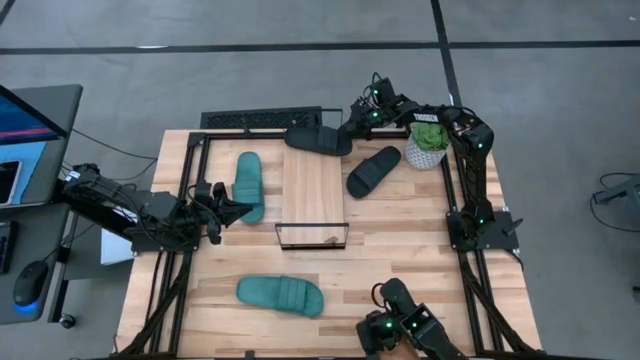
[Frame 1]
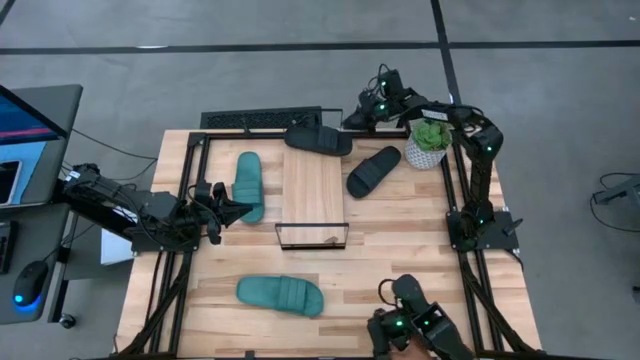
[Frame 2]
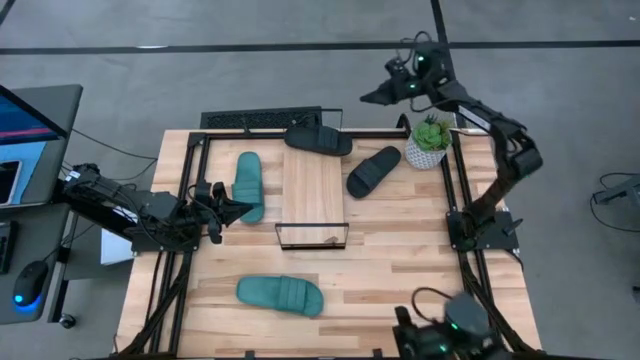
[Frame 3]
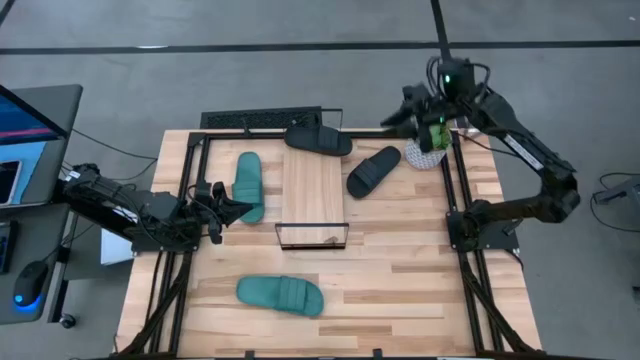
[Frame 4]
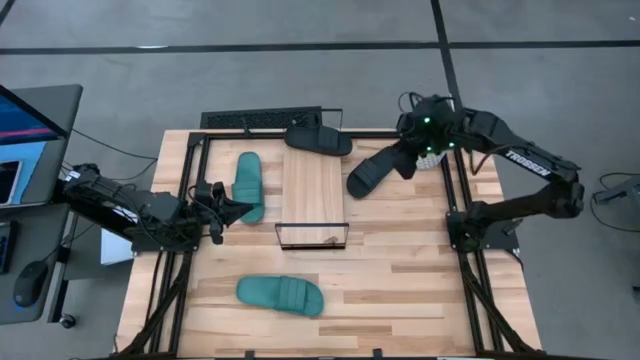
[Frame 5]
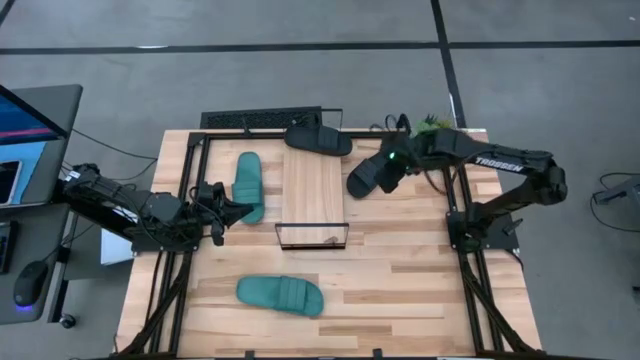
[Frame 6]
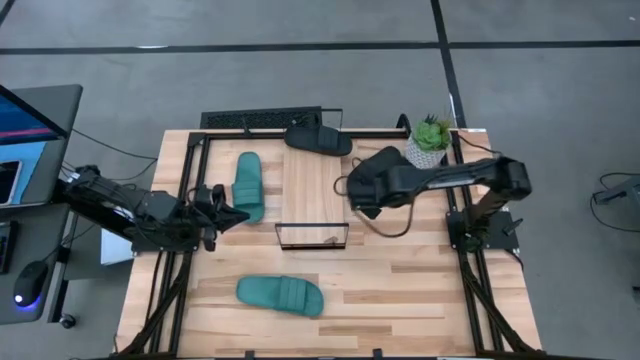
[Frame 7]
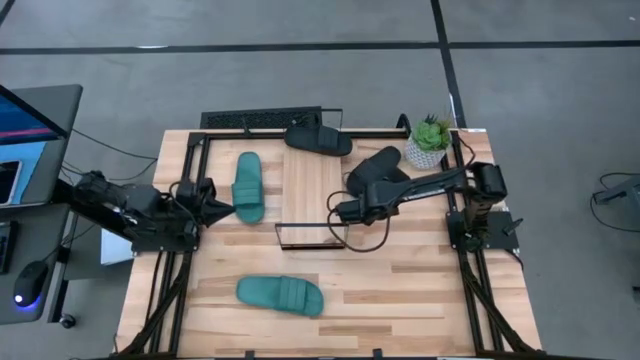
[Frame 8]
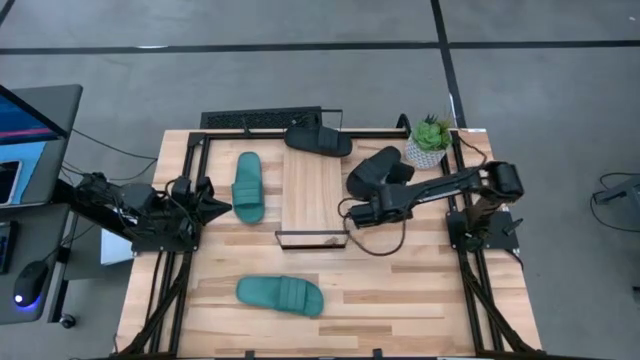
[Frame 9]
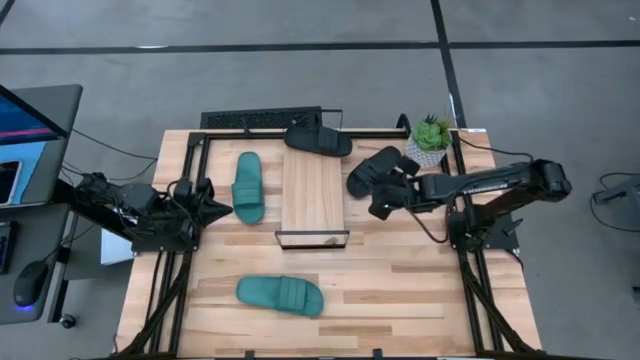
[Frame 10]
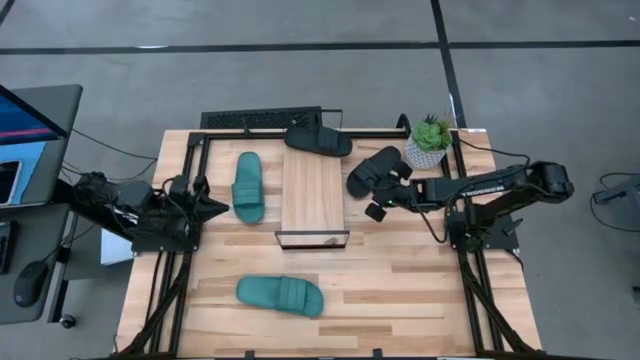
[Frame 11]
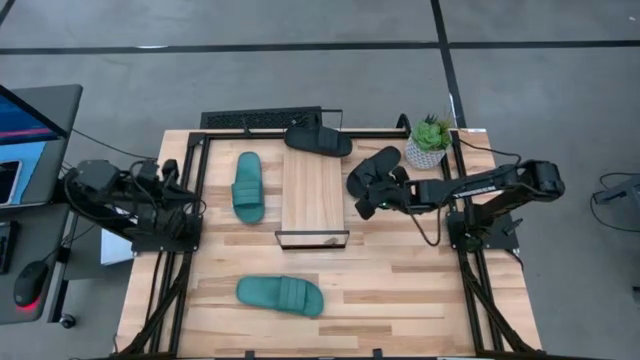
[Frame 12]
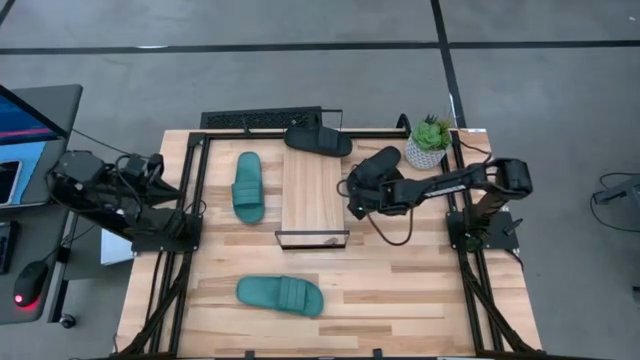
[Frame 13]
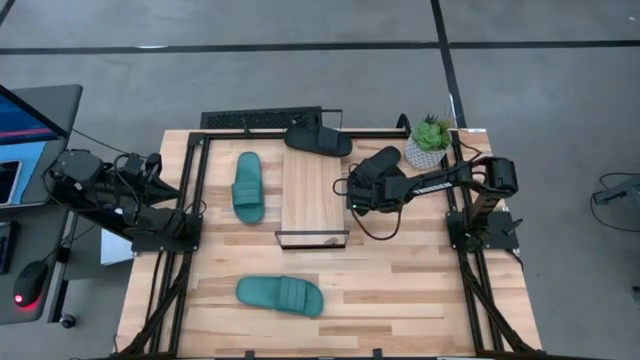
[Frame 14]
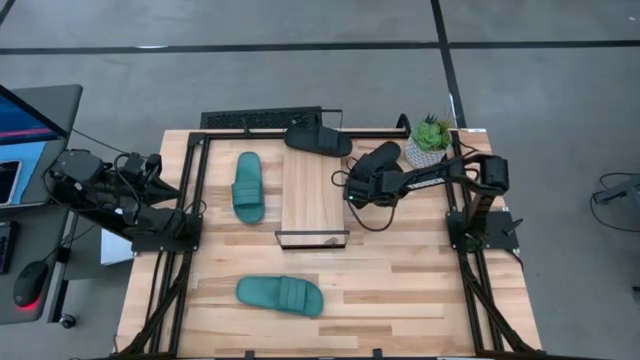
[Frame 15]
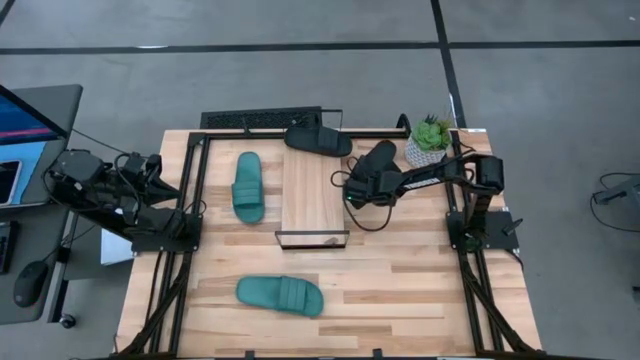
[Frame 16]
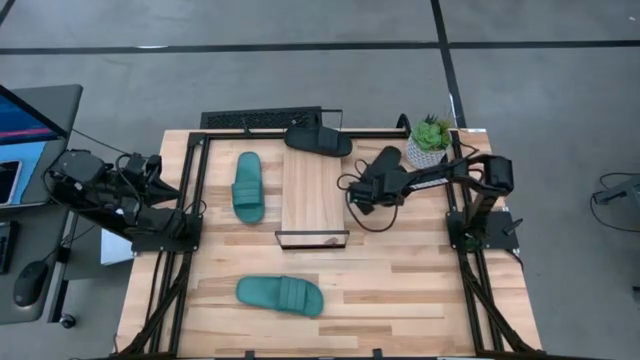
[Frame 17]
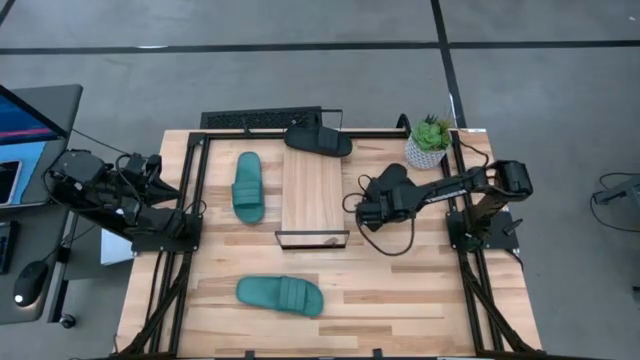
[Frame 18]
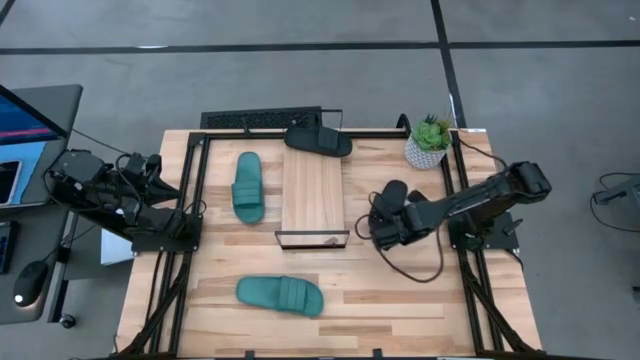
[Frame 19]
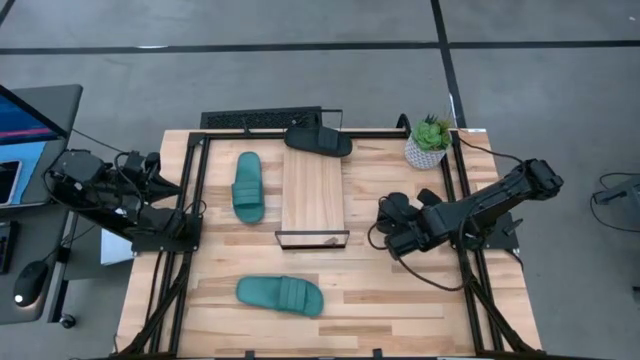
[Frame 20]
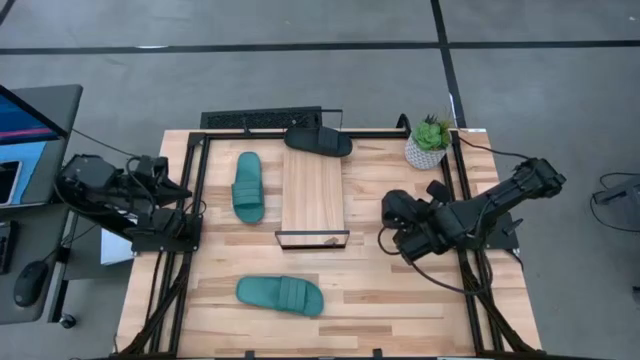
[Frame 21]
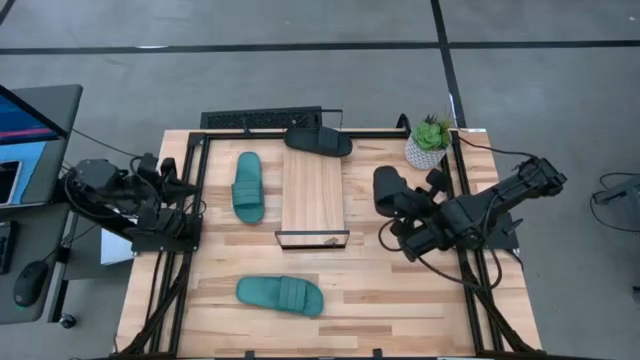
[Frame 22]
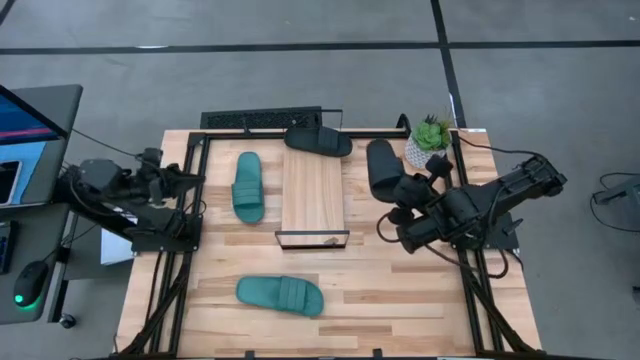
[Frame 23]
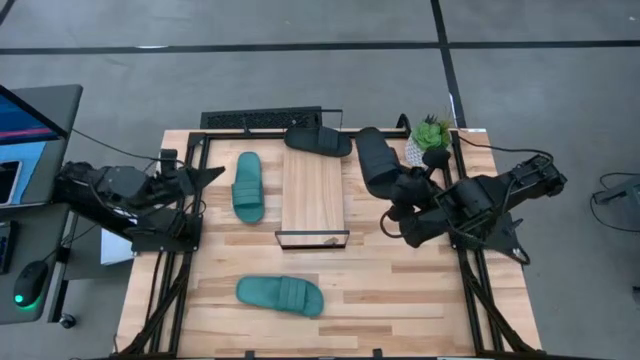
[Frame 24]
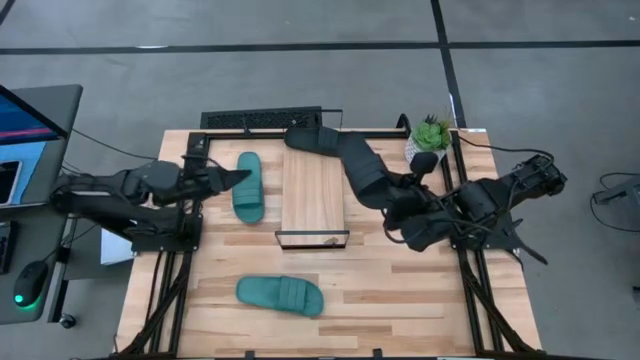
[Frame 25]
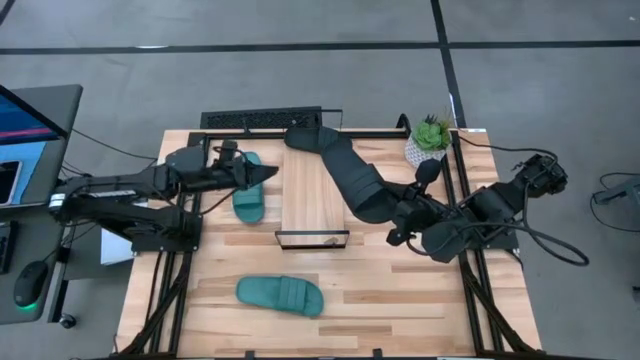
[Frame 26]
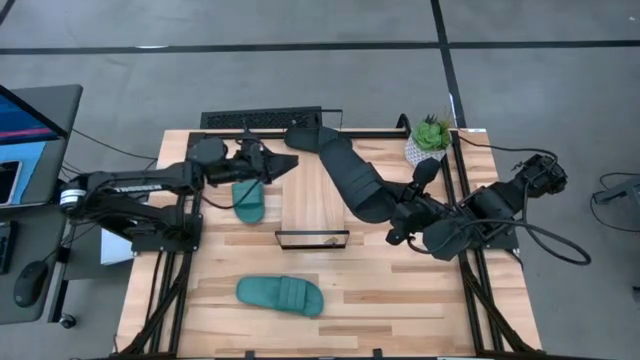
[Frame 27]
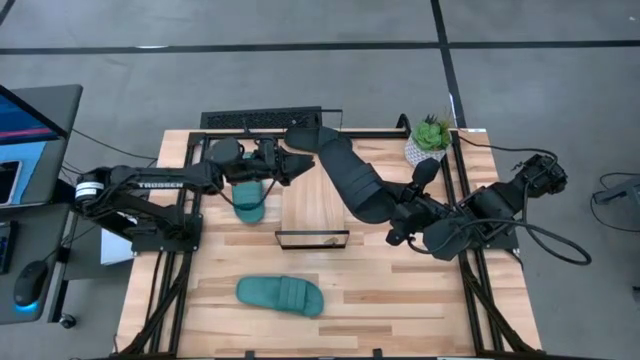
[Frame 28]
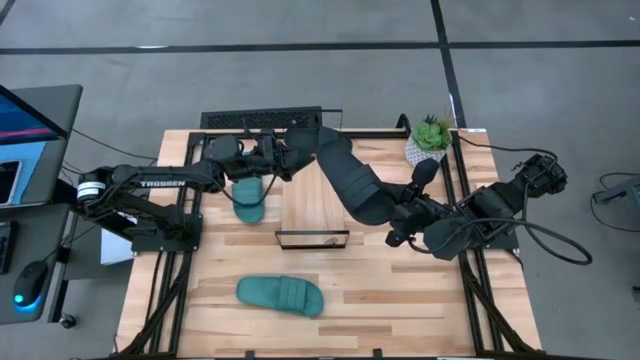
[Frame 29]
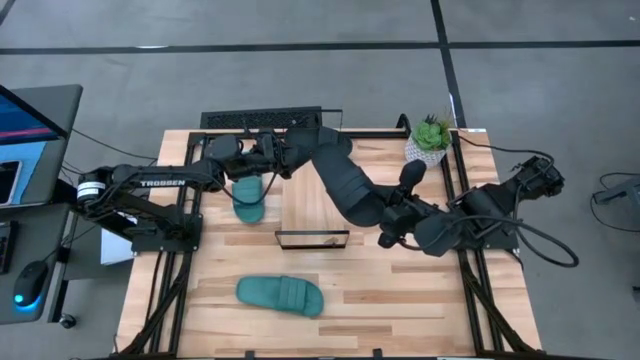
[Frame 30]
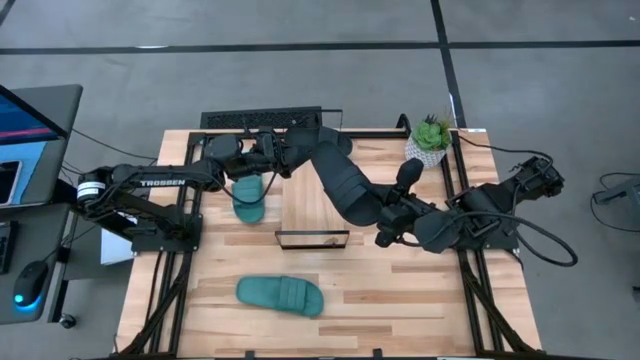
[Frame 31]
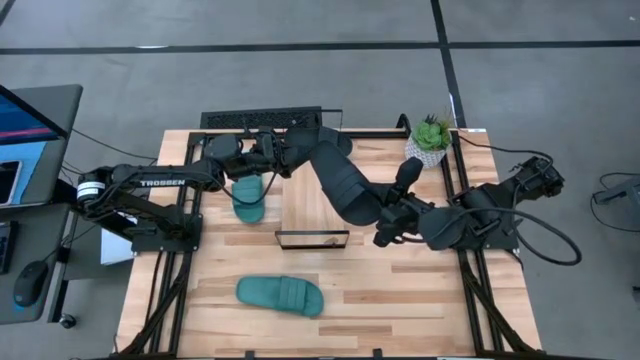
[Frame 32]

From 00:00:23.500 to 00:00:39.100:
Task: Pick and place slides into the shelf
Put the black slides on the shelf

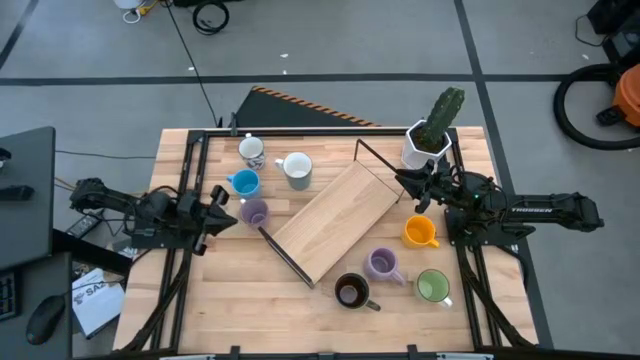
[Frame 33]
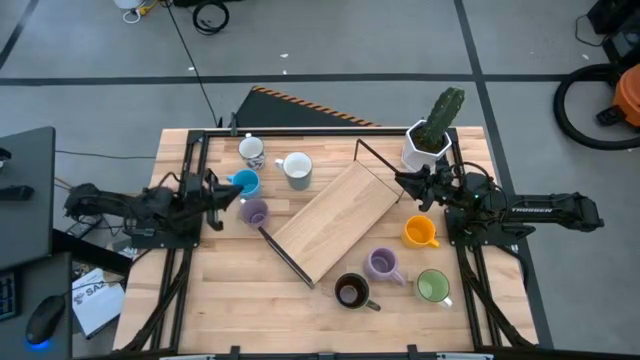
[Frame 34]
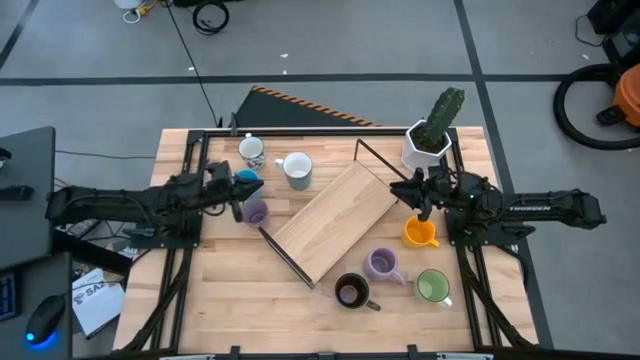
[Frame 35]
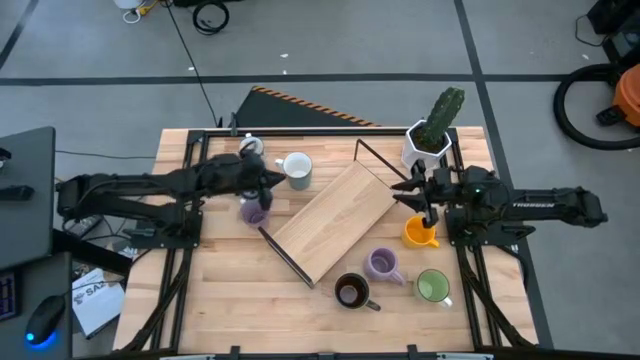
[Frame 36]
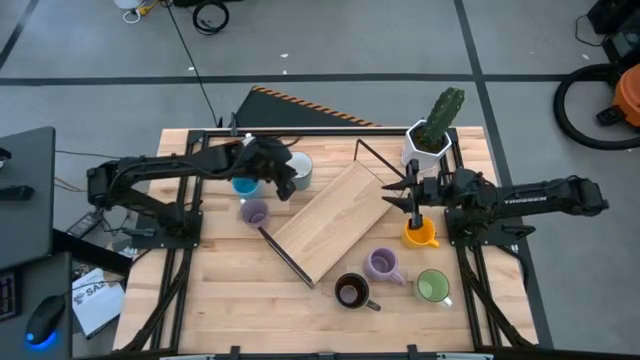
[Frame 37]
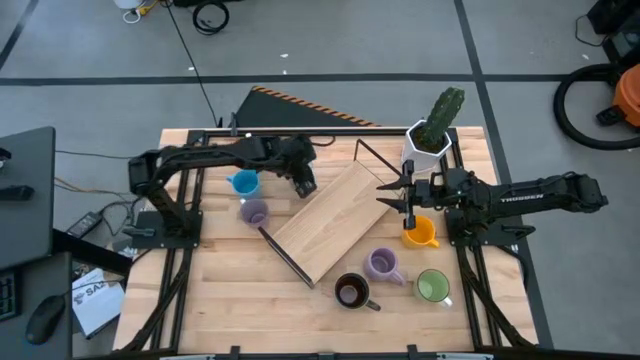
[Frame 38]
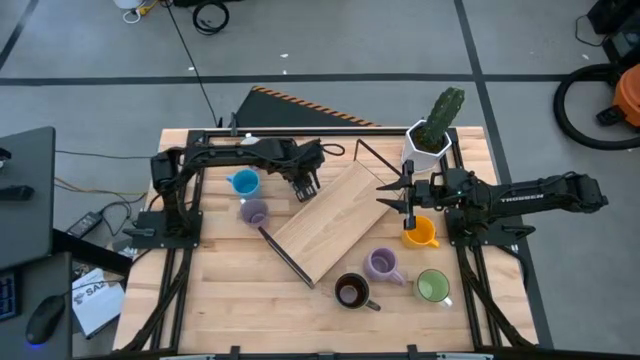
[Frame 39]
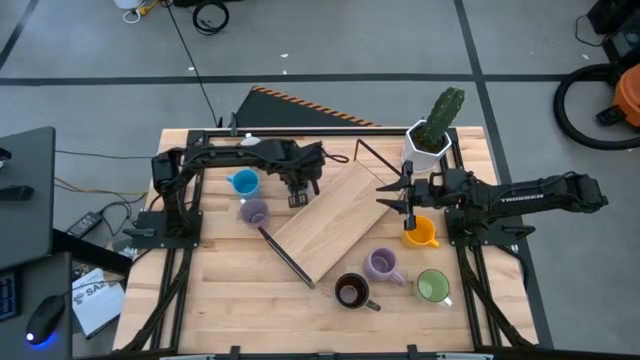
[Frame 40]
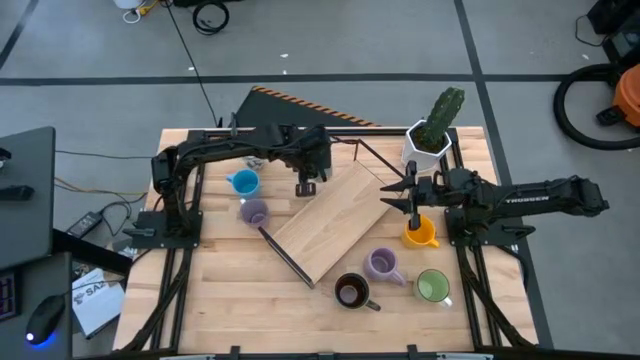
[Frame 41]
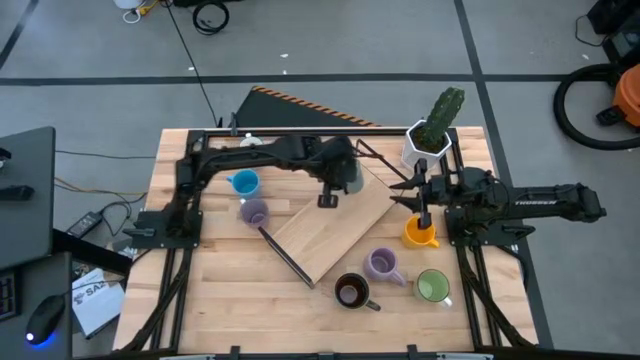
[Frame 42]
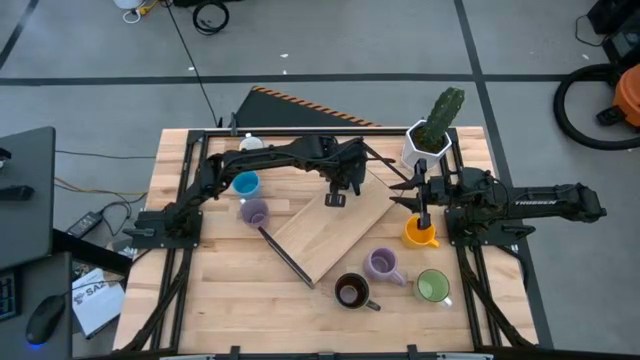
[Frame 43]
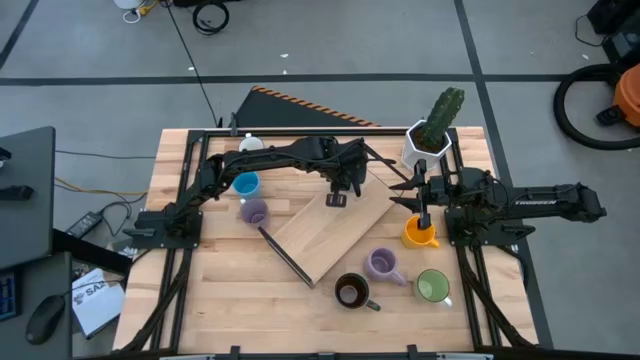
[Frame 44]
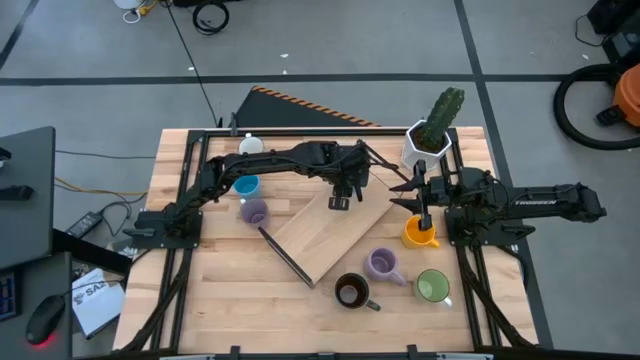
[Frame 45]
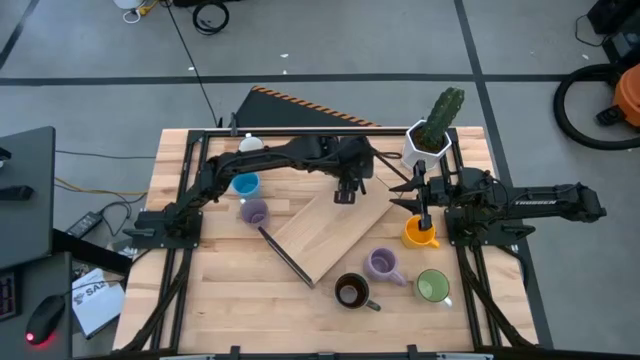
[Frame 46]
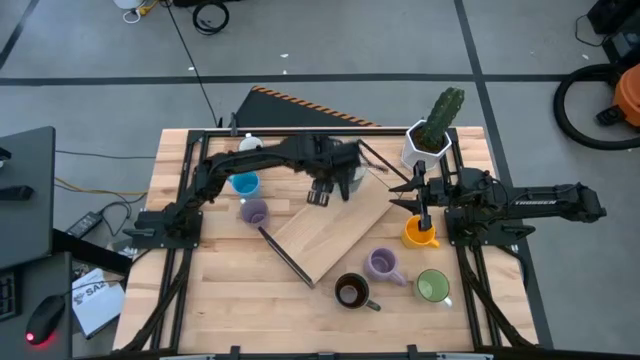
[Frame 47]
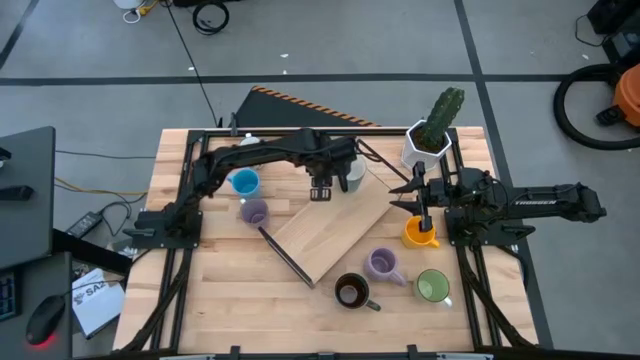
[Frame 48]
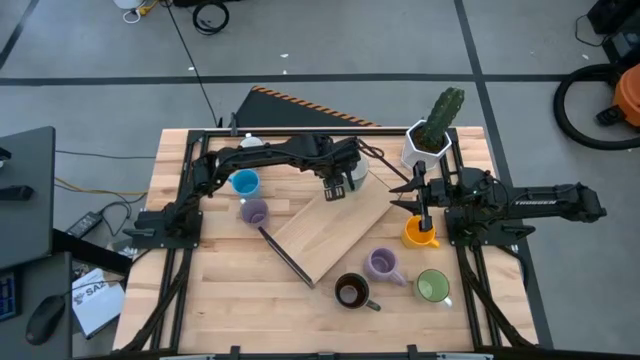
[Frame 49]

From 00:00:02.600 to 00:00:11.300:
Task: Place coffee mugs
Put the blue mug on the shelf
